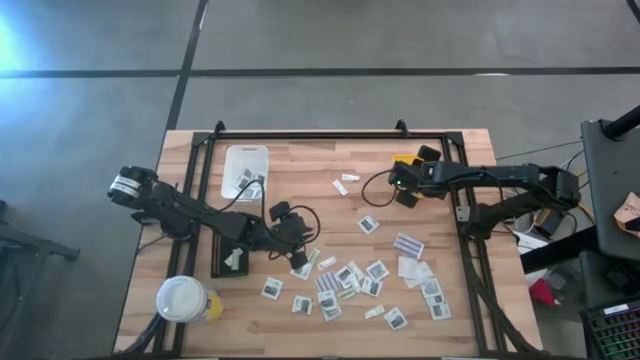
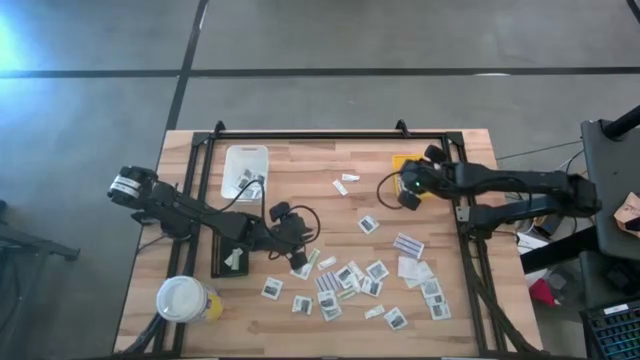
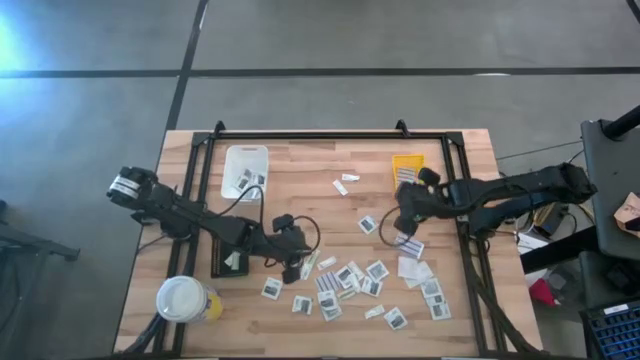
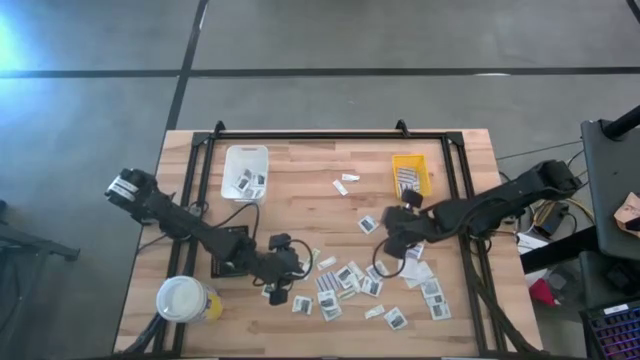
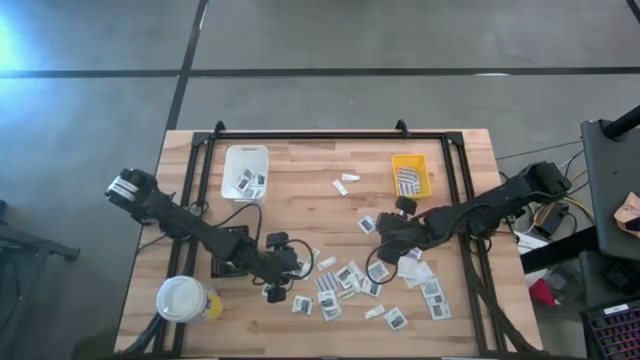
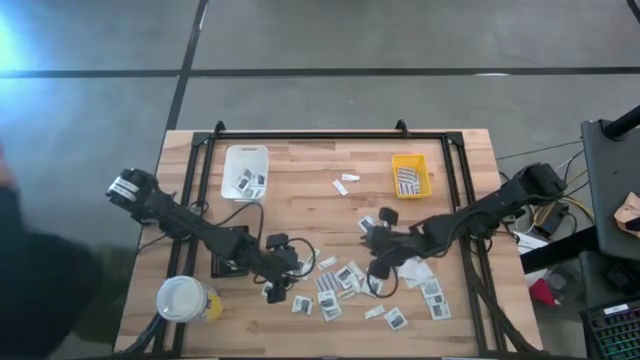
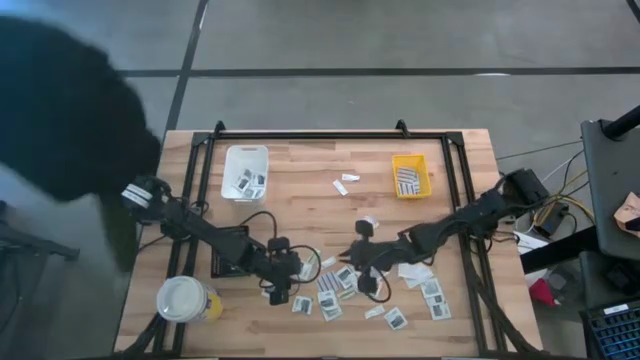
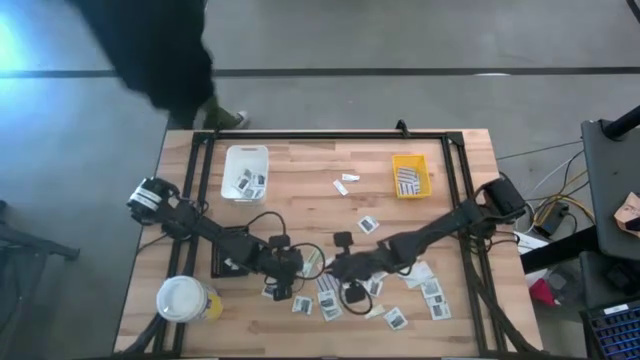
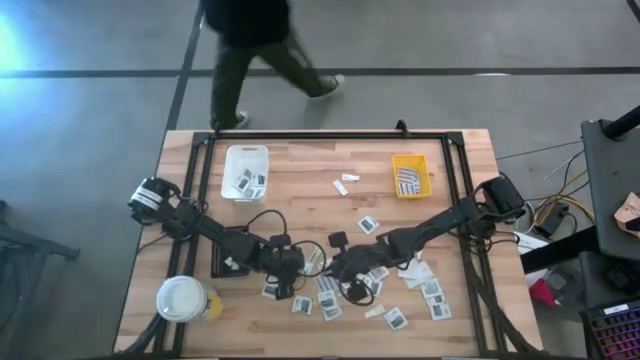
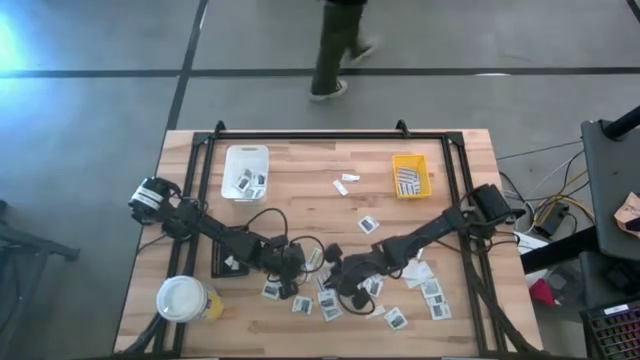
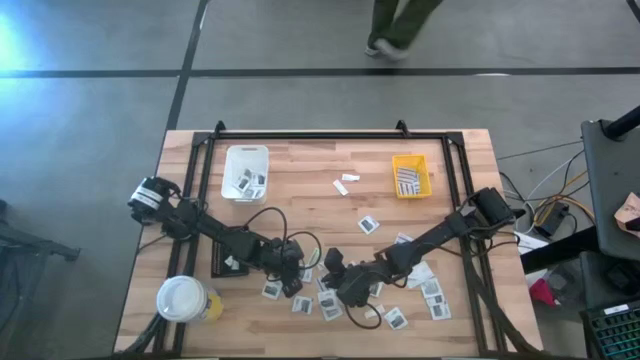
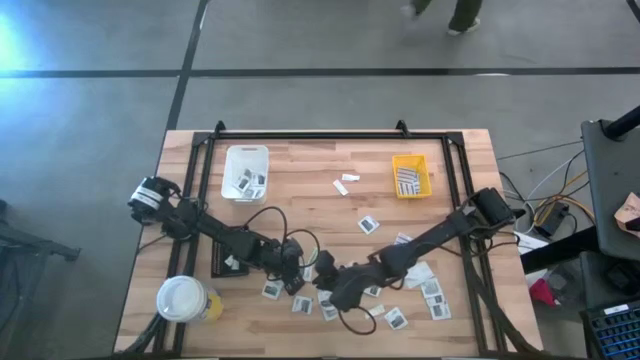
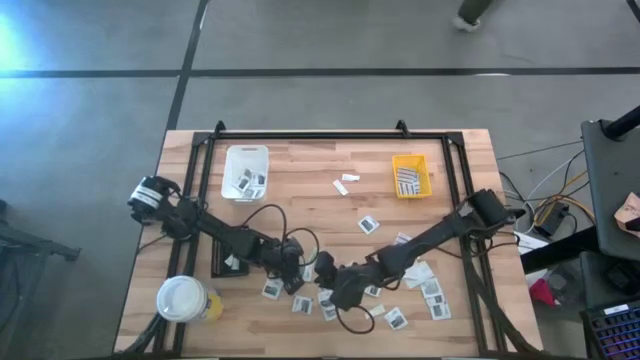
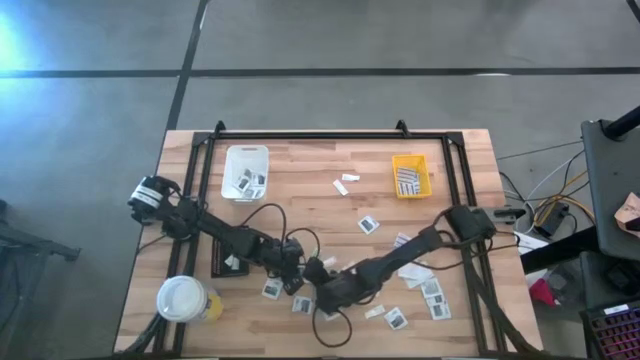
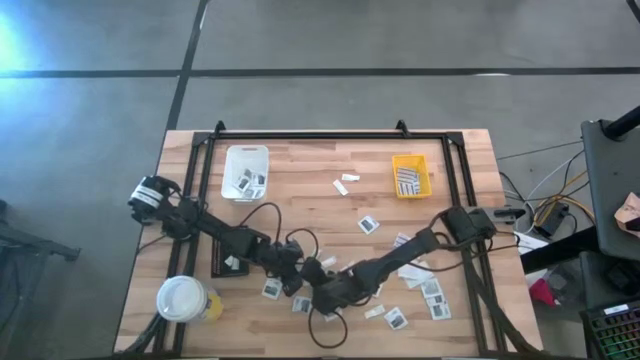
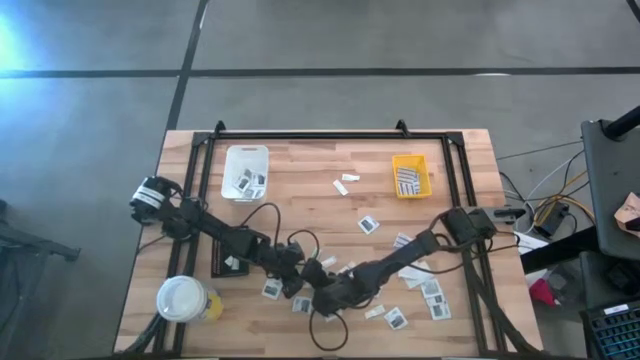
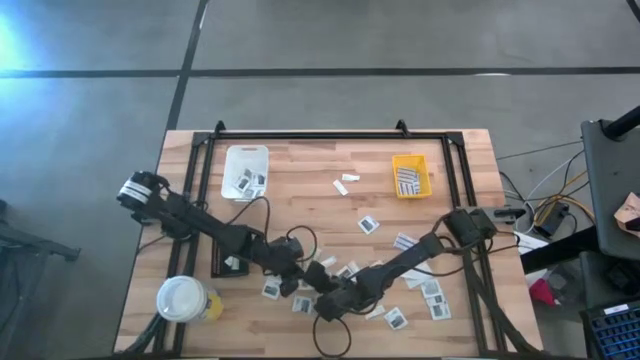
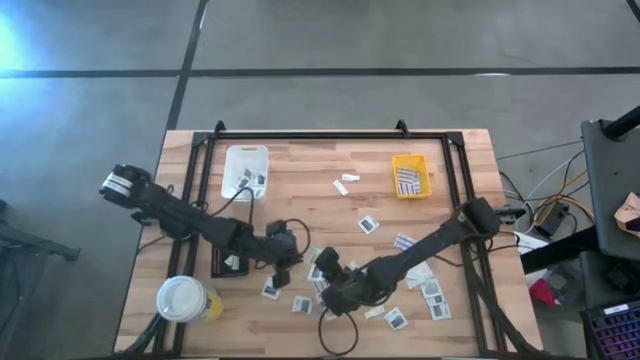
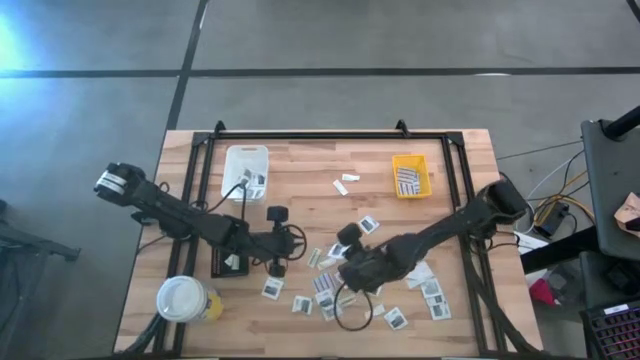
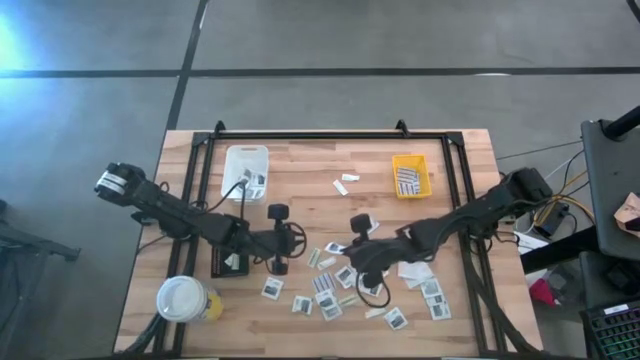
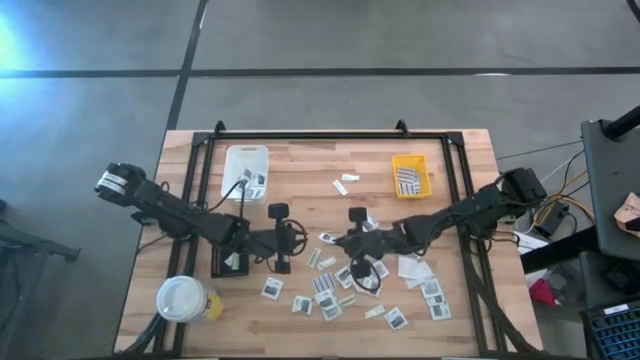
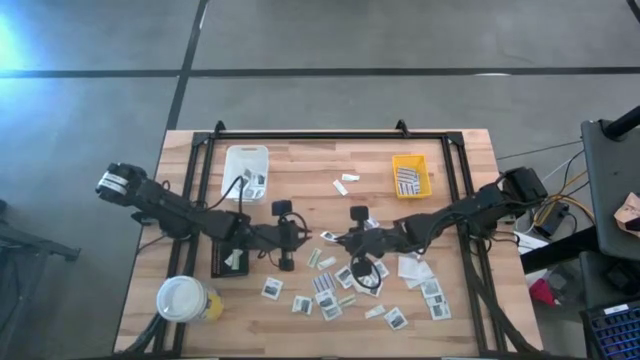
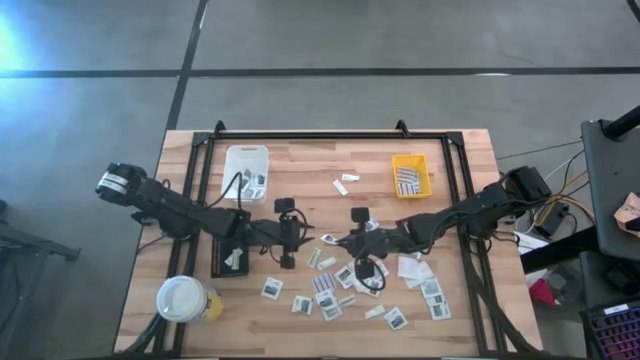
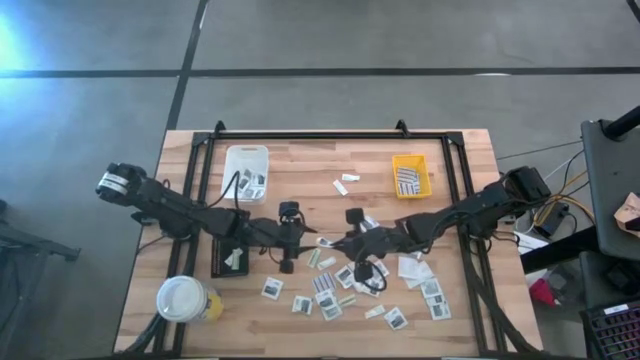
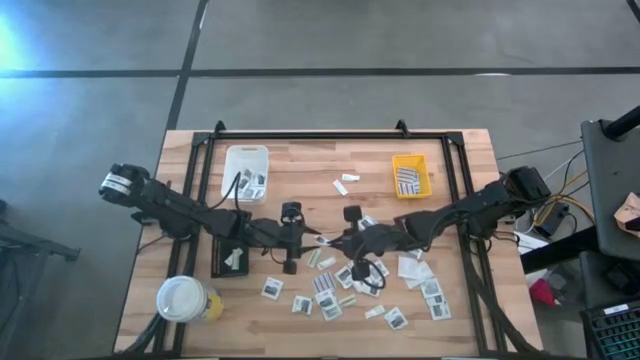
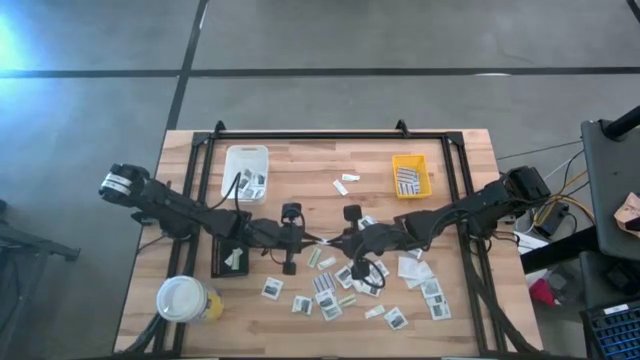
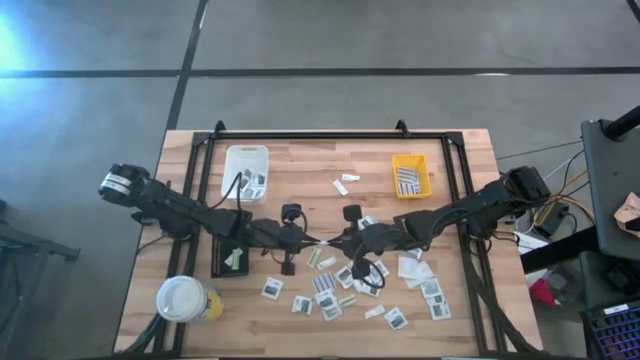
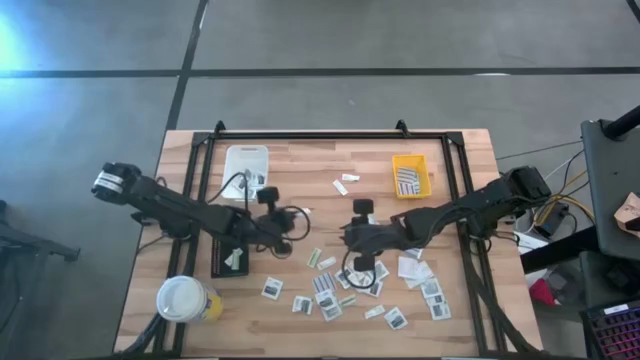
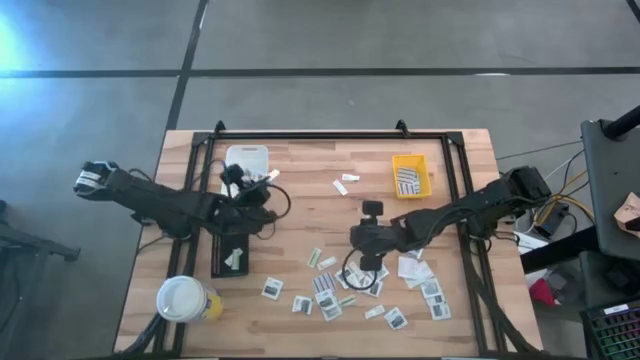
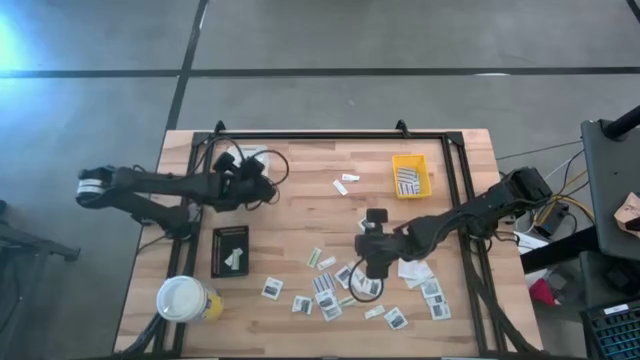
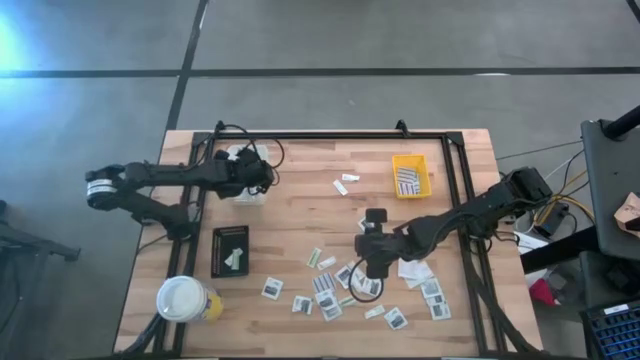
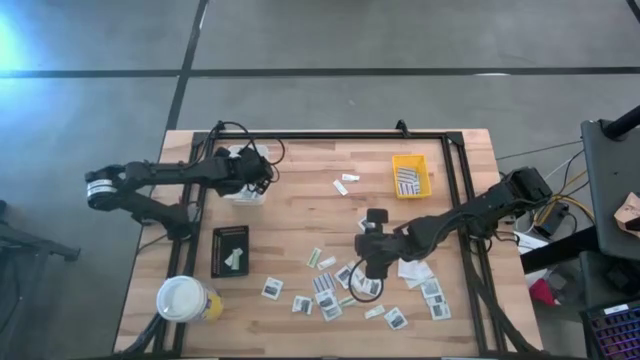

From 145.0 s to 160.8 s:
Task: Pick & Place First Aid Supplies
Put the gray towelette pack into the white bin

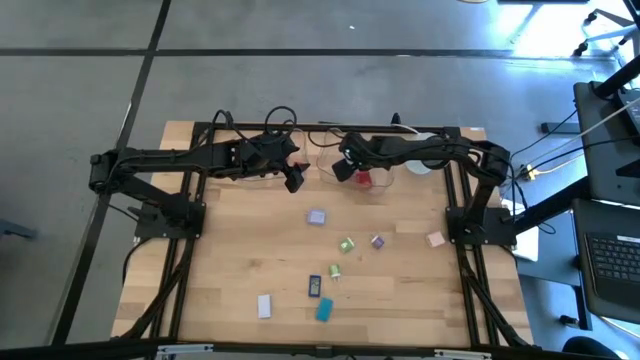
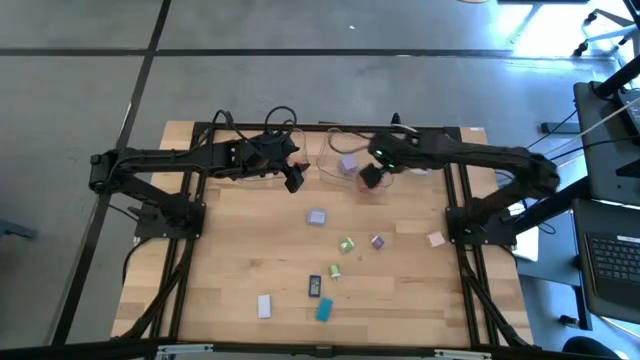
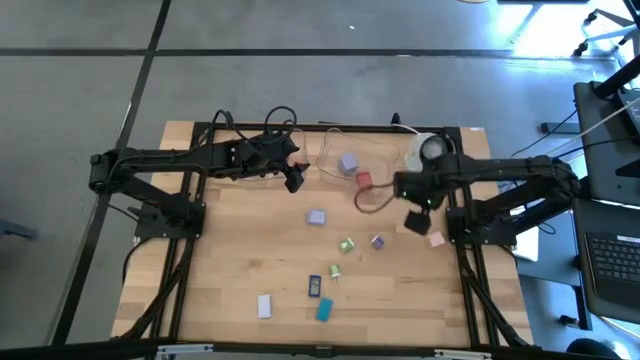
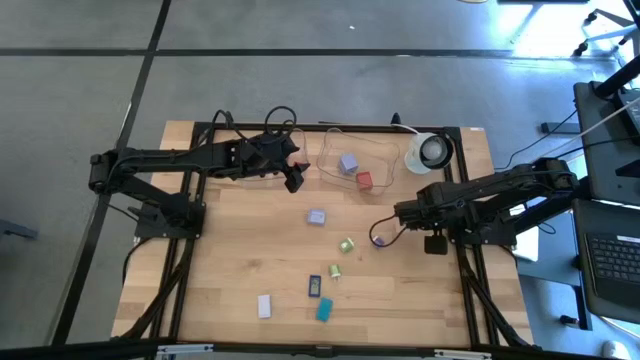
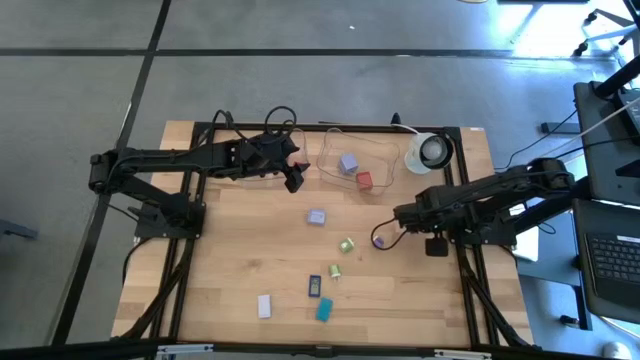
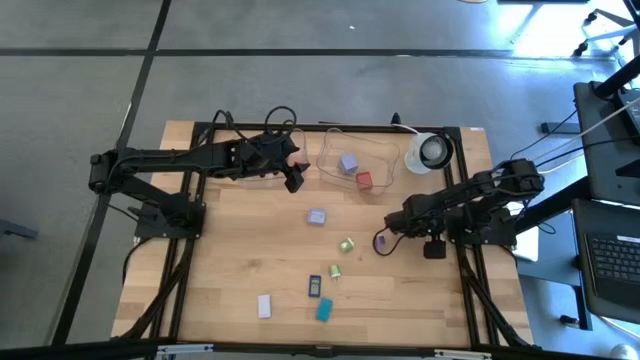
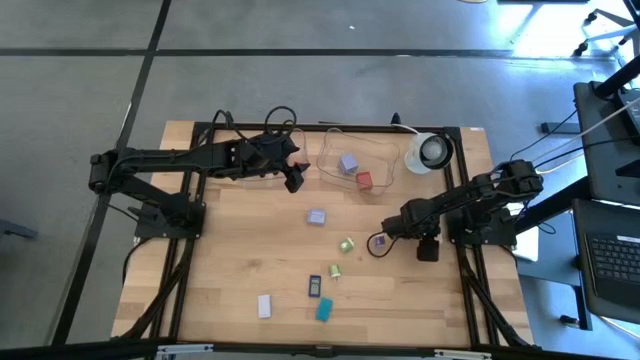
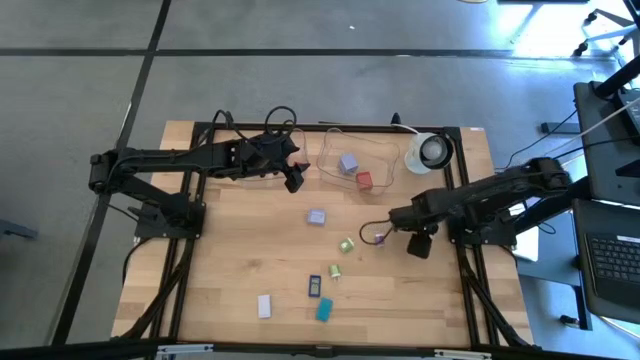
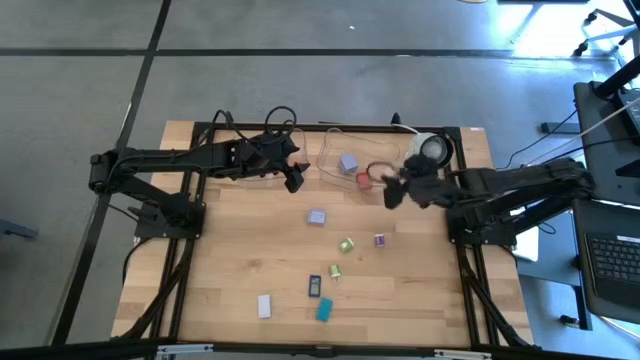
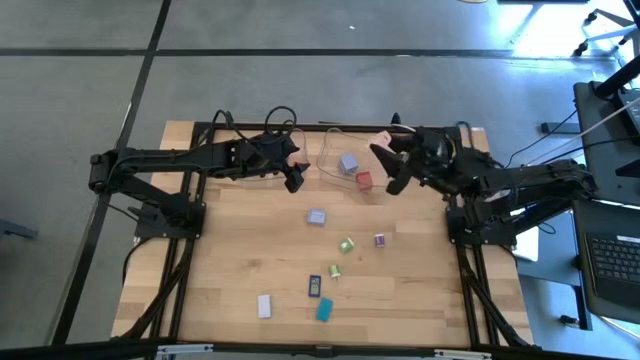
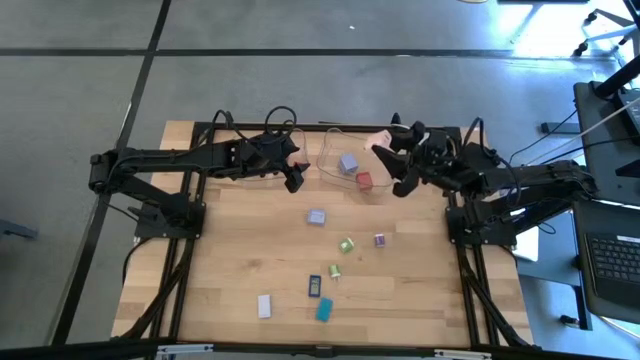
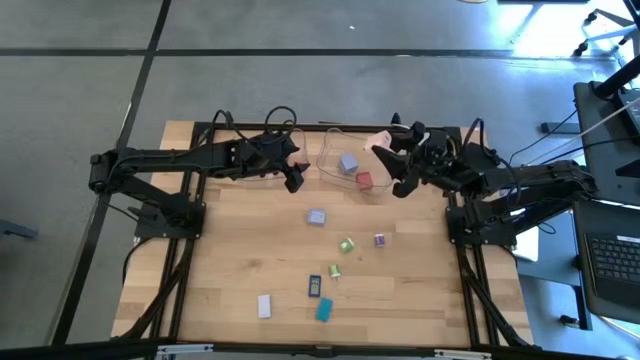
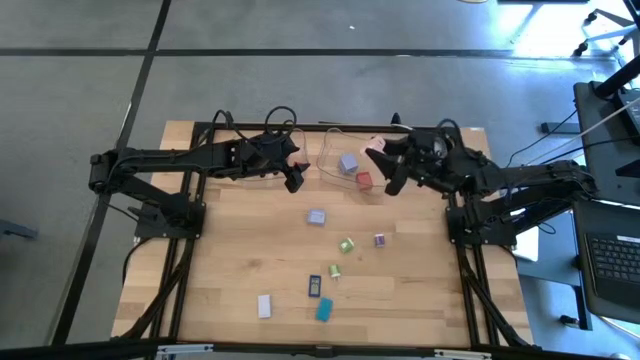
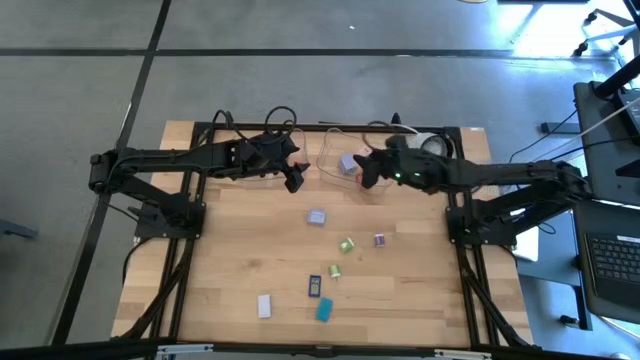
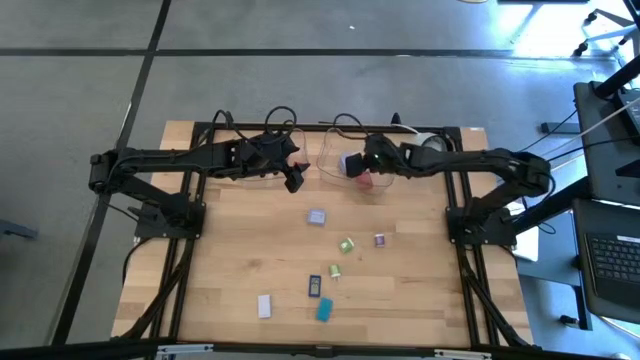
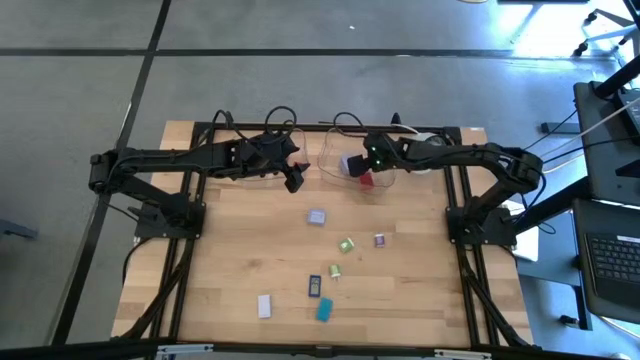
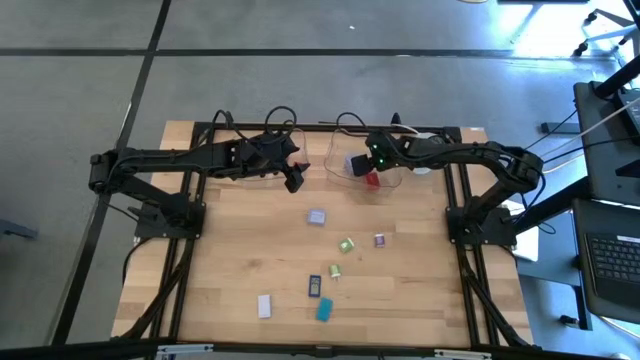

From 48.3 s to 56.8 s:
Task: Pick & Place Office items
Put the white charger adapter into the right transparent bin
